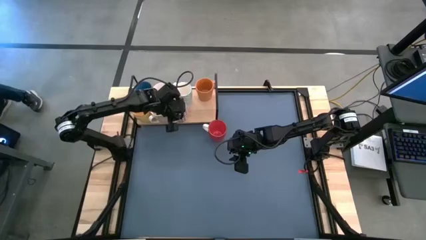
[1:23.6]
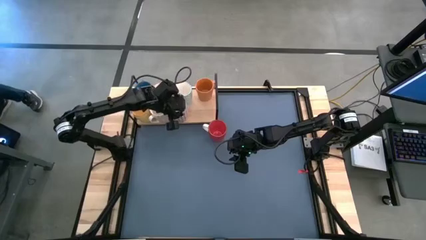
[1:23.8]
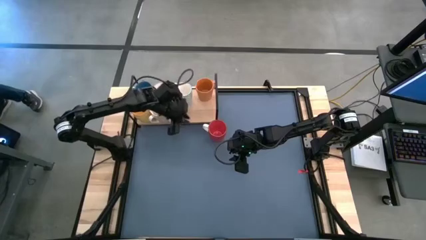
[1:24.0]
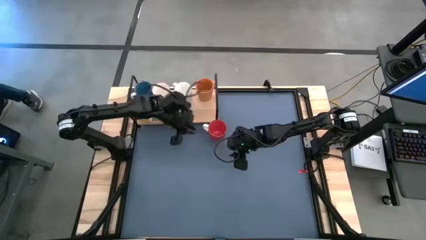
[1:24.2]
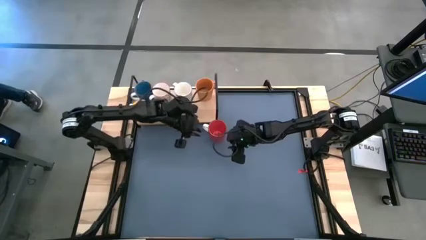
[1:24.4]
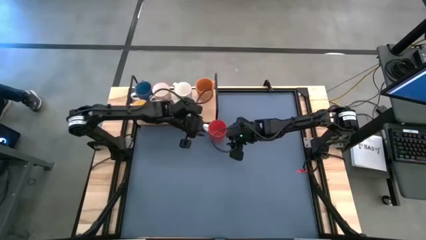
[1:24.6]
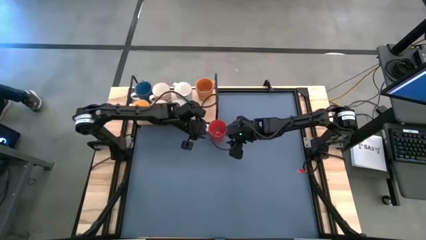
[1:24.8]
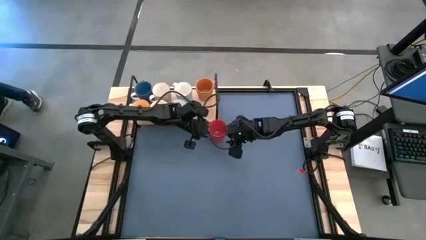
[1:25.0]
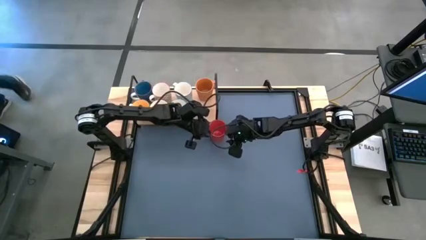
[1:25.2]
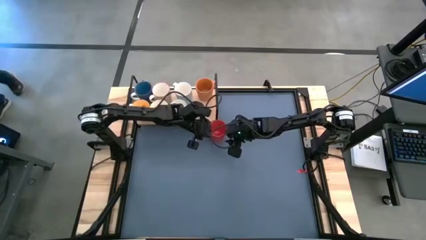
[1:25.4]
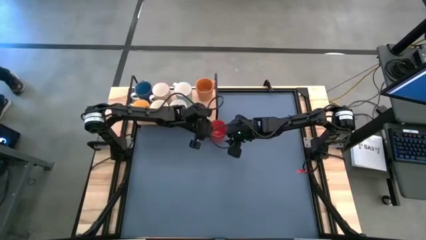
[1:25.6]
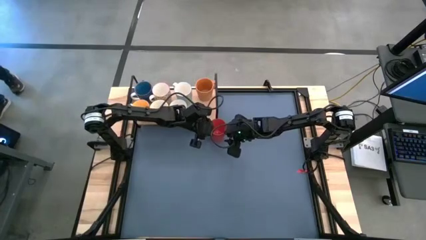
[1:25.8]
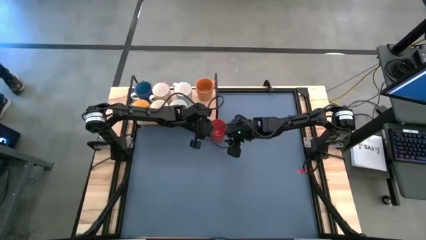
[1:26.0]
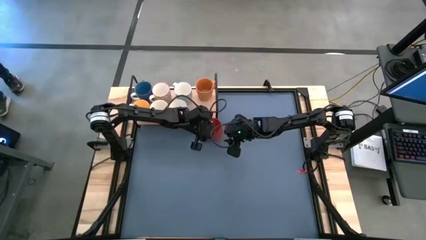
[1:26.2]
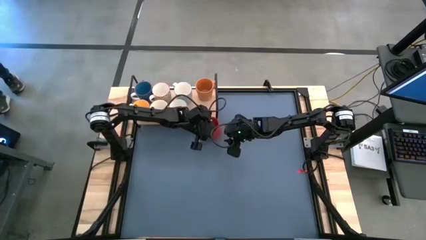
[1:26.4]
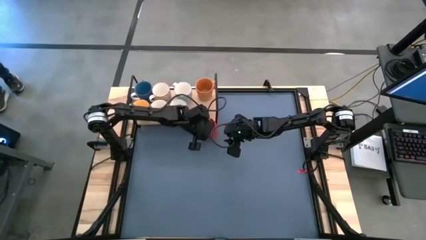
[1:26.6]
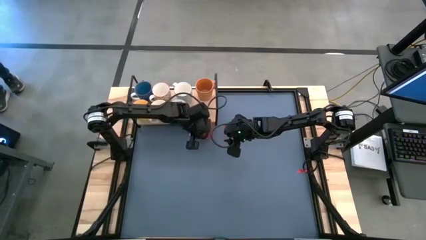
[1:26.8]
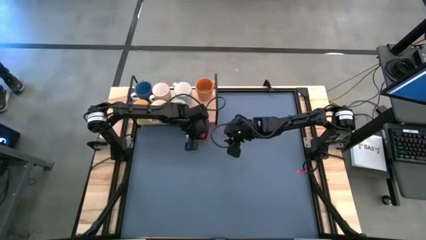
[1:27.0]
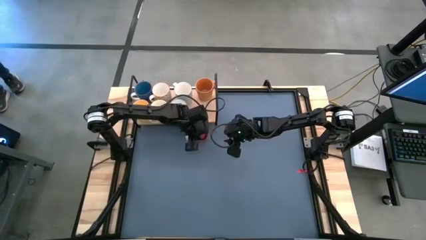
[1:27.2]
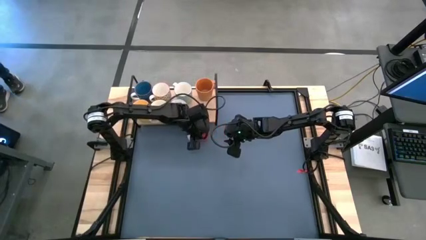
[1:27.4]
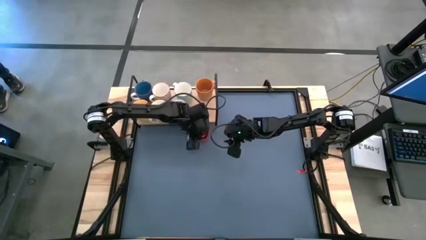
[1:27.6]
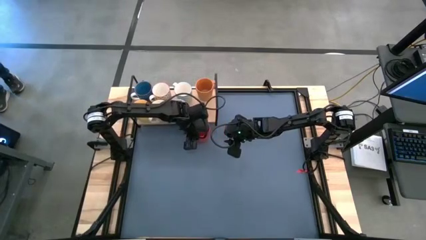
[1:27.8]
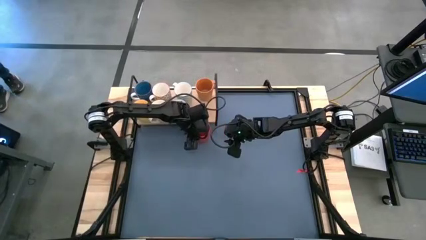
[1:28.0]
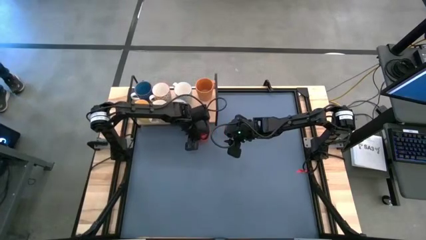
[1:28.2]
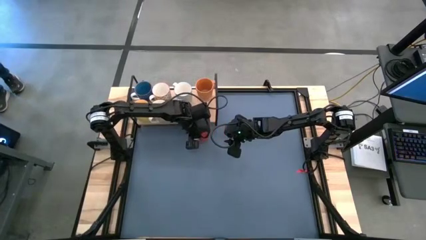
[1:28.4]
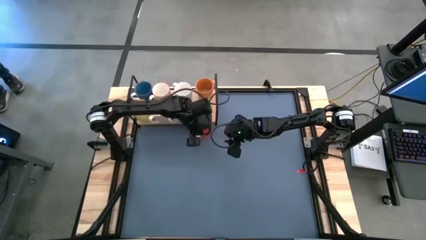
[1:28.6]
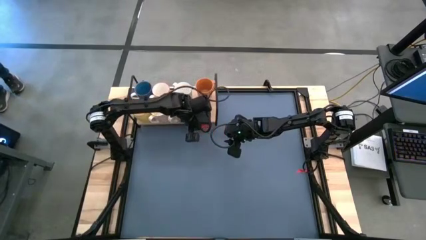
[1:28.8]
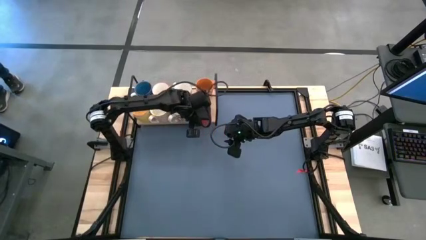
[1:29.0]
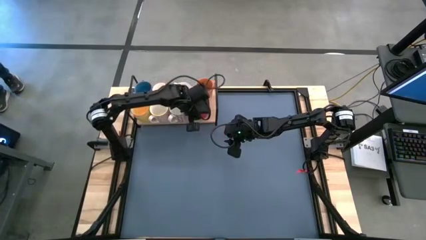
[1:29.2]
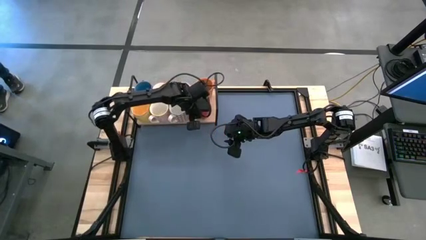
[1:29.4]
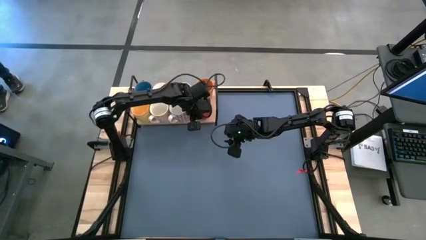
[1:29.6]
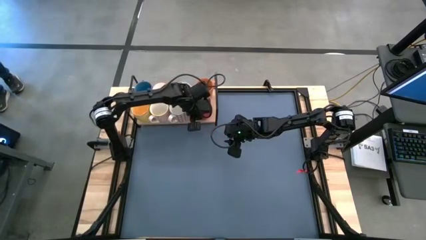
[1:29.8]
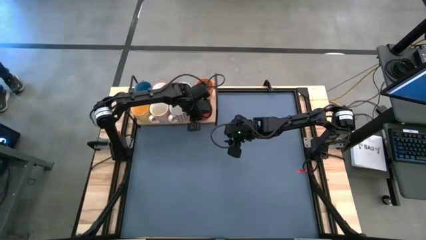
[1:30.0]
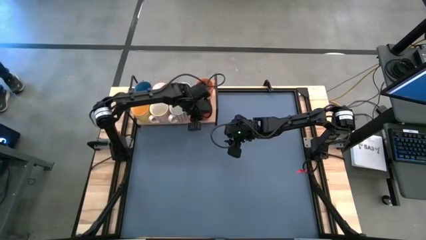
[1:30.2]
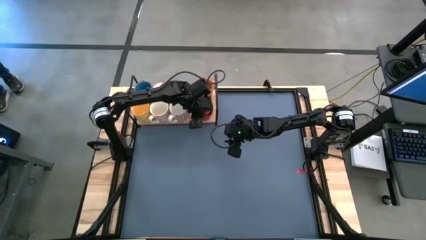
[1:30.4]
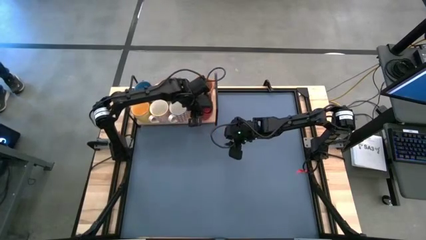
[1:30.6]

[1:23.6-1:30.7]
Task: Place coffee mugs
Put the orange mug on the shelf

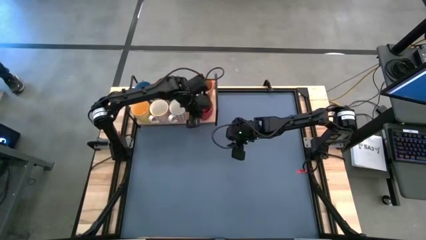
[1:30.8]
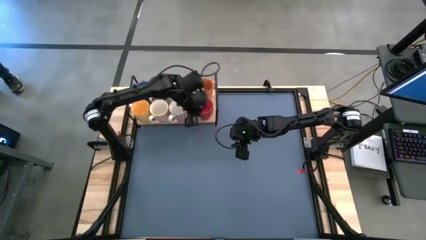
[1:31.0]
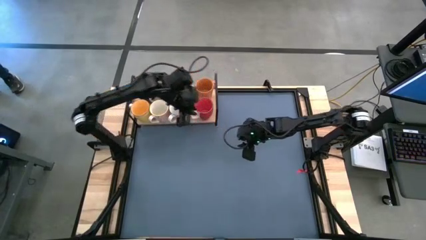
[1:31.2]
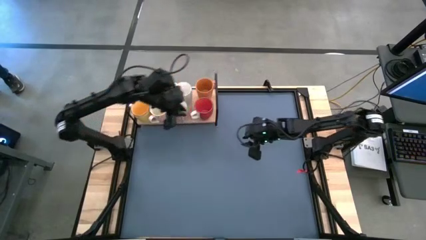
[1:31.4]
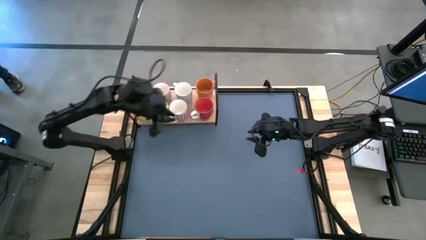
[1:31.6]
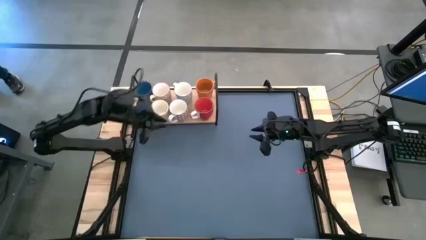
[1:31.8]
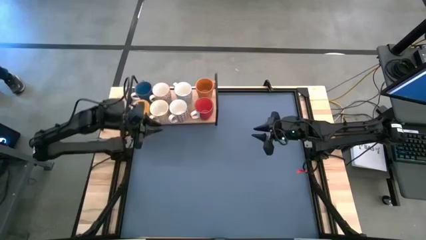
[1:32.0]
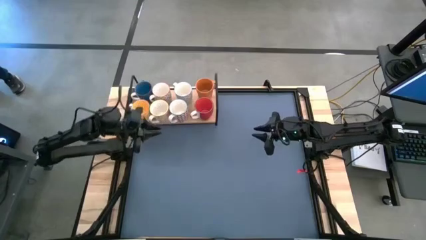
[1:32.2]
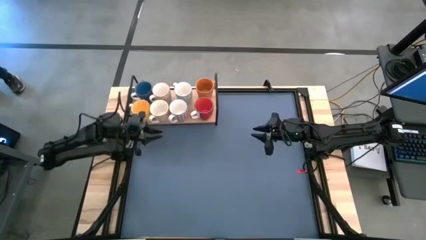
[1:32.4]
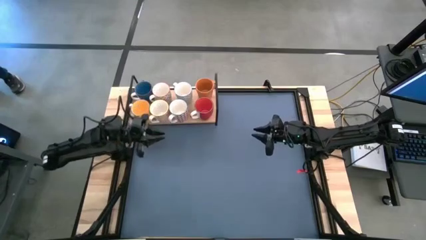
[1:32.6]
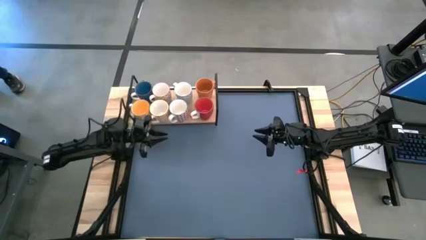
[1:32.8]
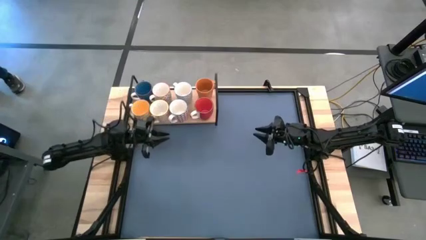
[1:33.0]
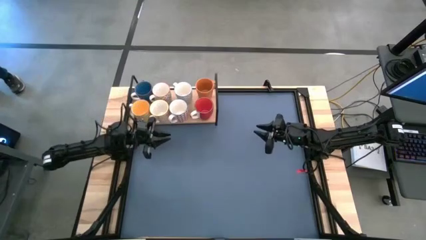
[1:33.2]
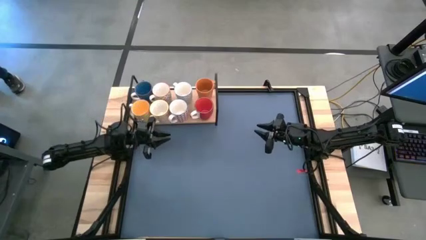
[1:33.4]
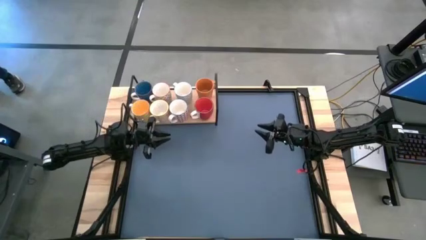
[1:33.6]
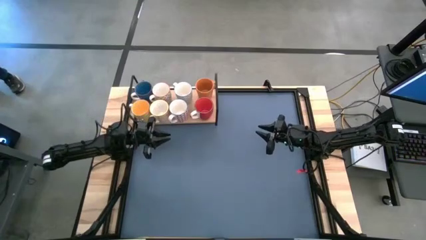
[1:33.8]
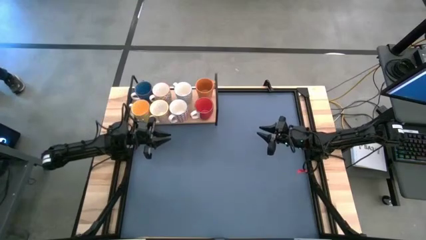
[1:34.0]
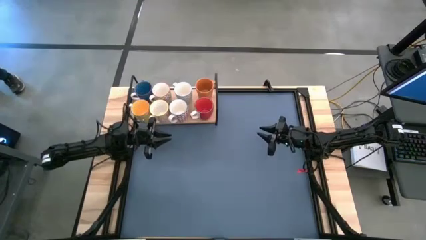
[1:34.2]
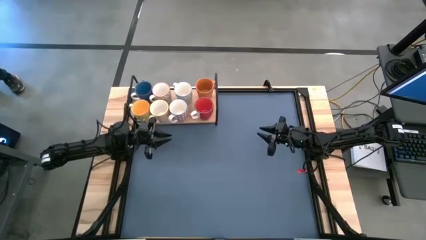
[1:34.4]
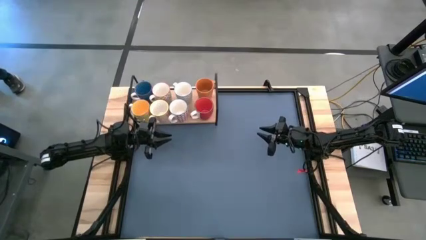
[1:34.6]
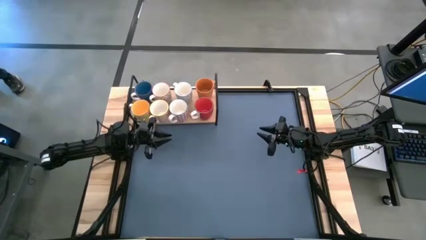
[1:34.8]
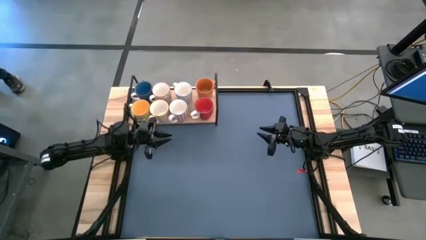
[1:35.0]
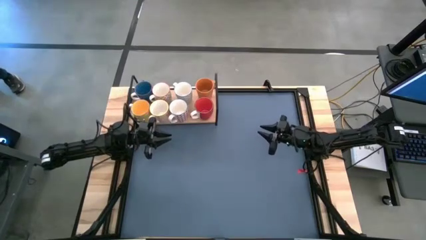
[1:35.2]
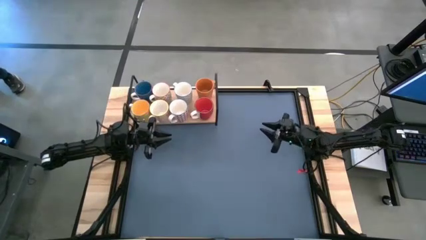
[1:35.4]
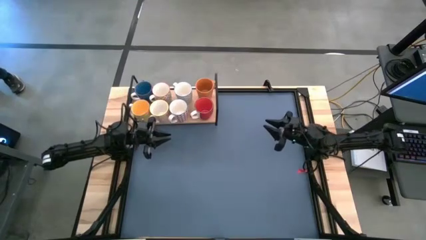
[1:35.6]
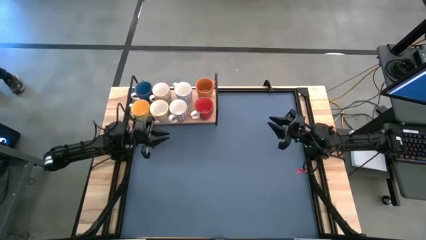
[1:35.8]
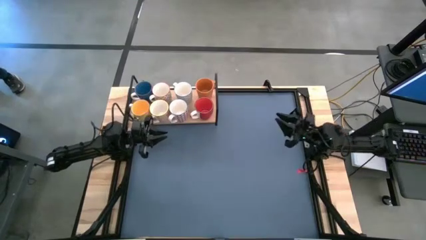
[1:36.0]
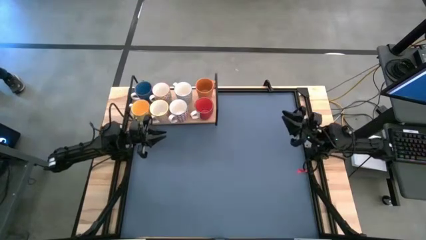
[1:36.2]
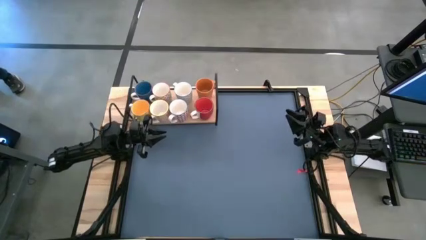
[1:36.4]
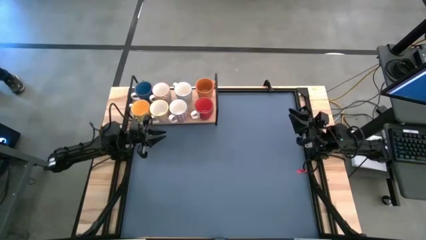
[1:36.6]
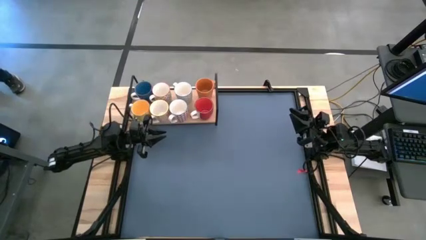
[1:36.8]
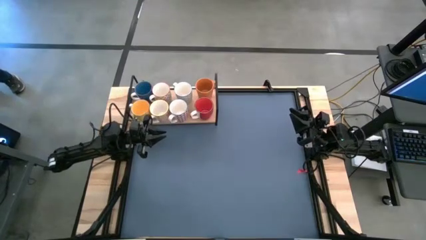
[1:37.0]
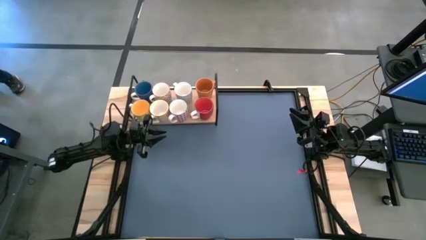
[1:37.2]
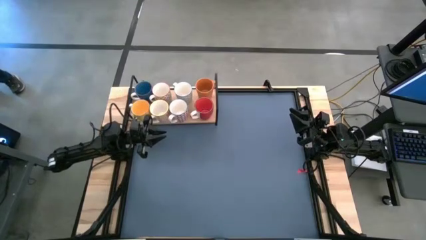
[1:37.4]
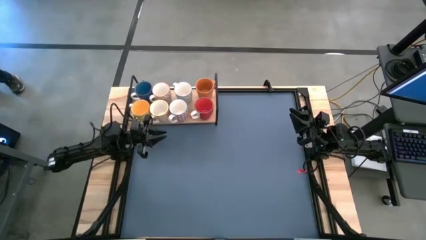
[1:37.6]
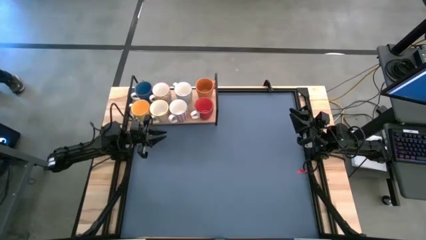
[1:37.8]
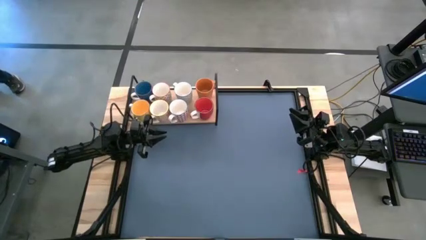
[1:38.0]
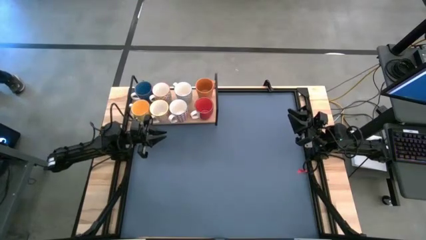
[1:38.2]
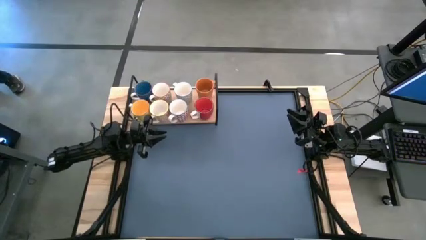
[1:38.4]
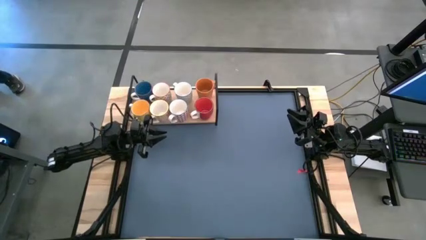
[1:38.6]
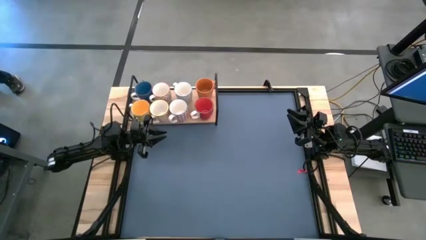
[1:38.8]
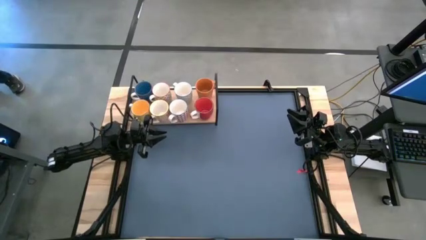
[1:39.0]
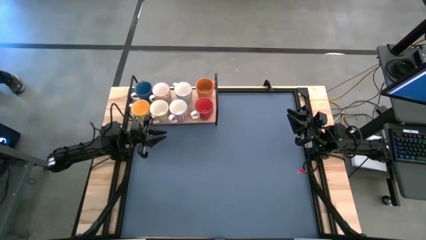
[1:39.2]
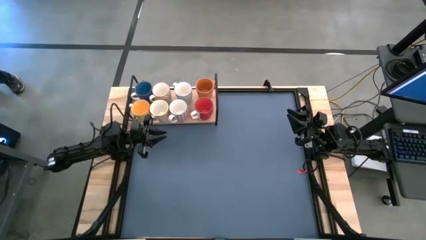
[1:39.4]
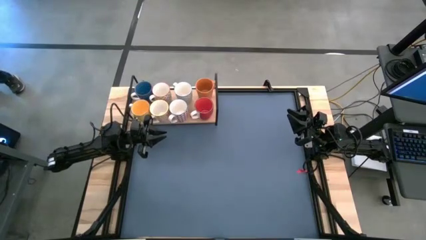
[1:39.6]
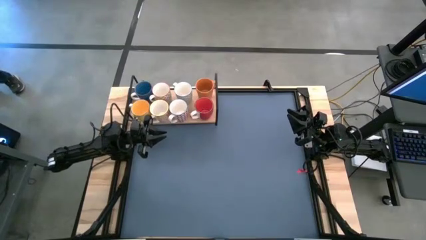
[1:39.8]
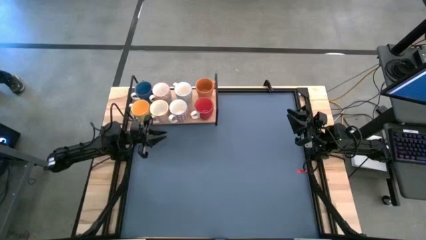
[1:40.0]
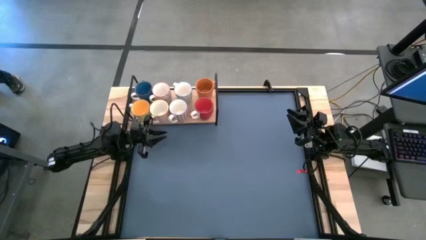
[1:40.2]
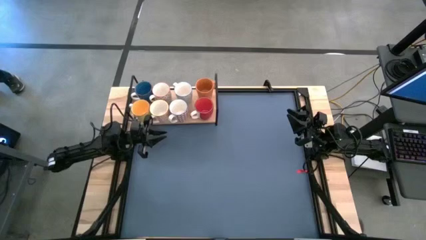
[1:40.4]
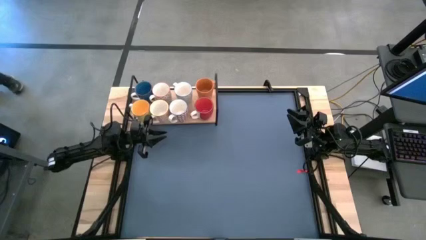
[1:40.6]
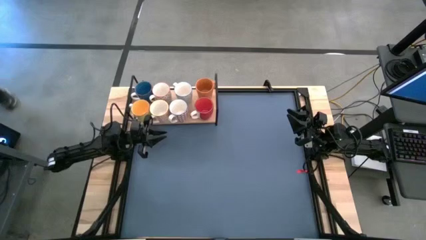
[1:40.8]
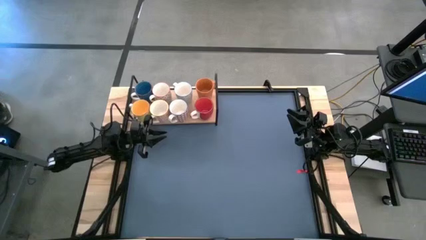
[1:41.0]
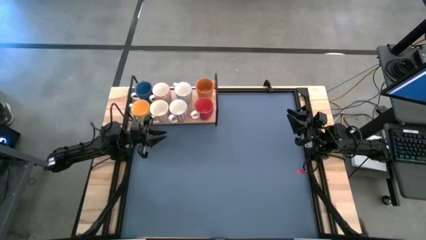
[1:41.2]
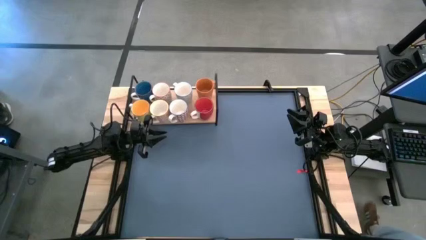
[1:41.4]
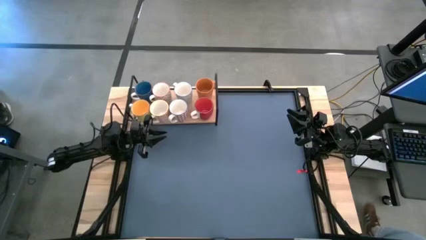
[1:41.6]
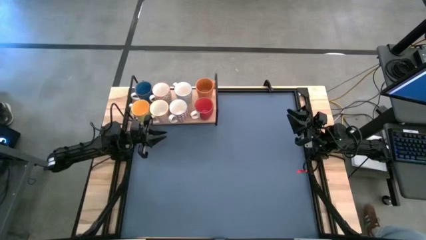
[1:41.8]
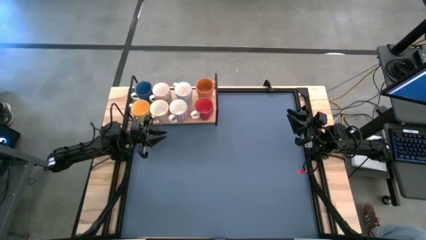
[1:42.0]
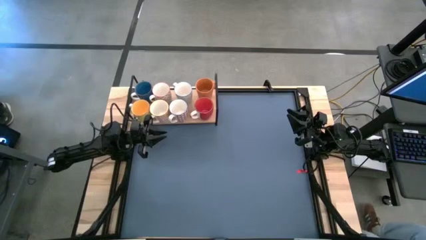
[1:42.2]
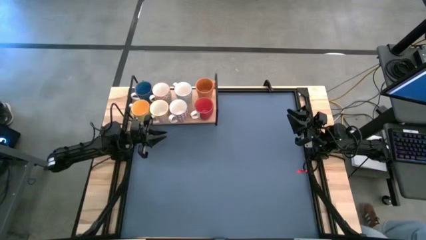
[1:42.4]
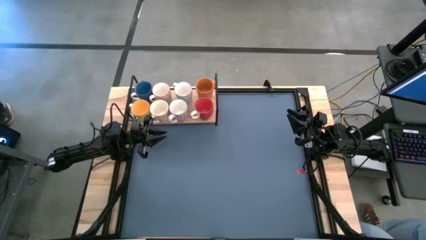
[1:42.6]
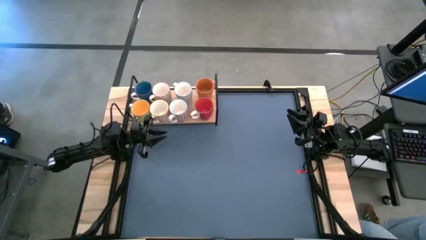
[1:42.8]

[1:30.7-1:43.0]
Return to Home Position
